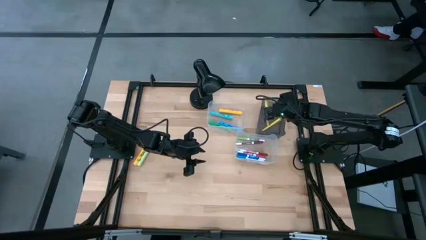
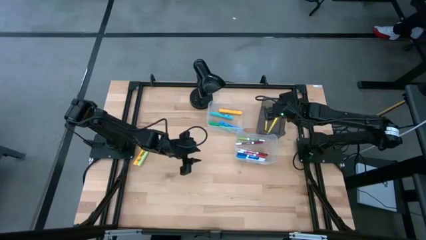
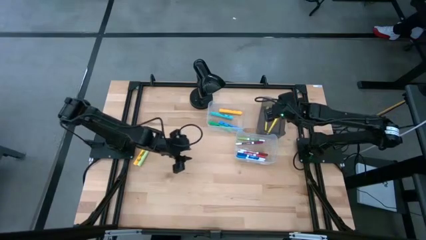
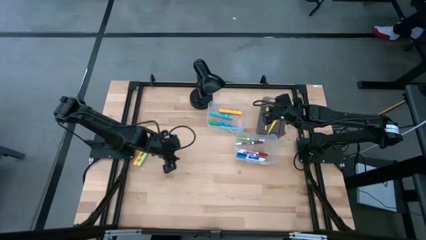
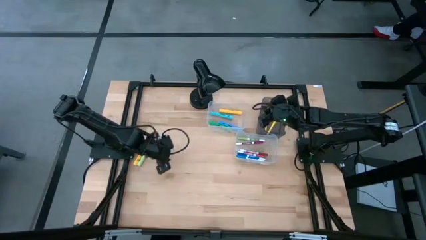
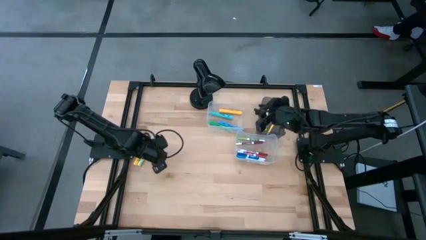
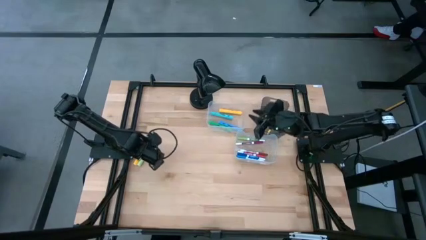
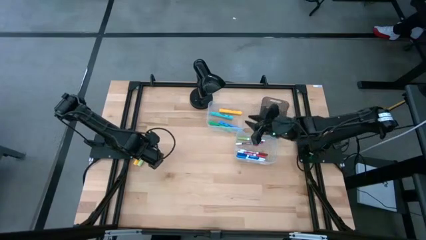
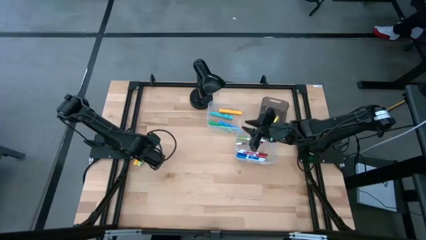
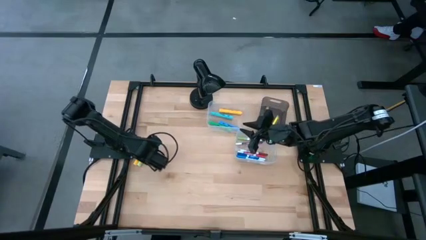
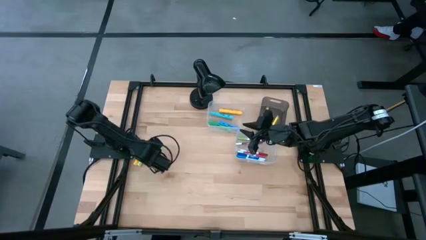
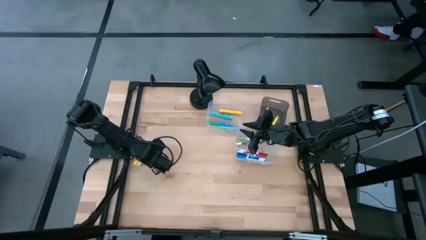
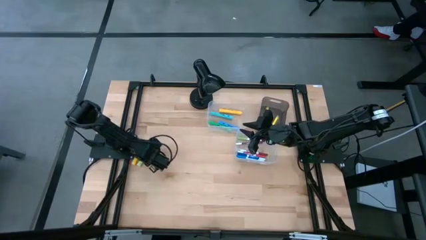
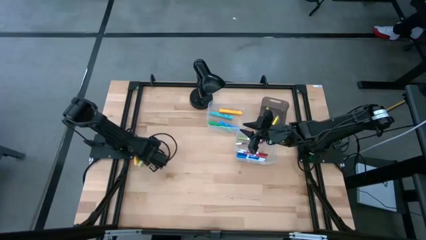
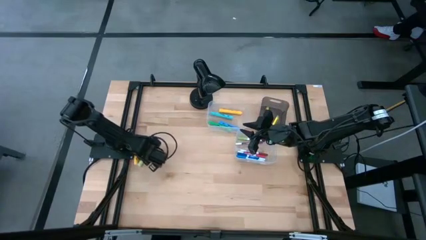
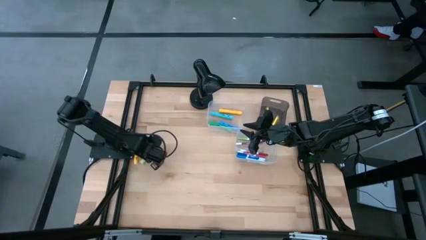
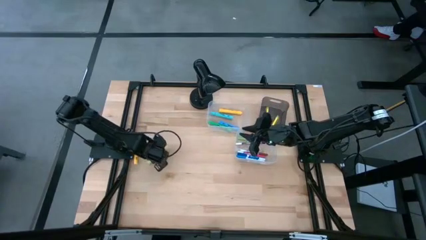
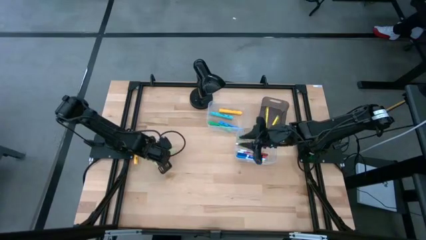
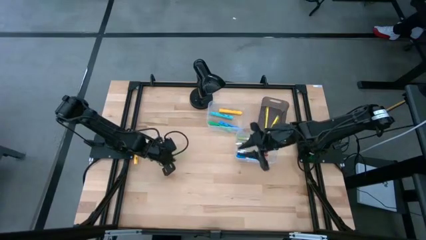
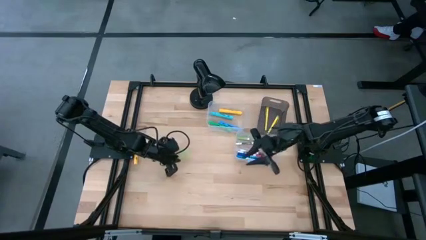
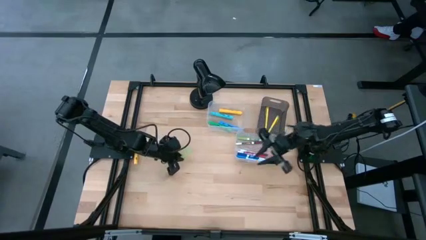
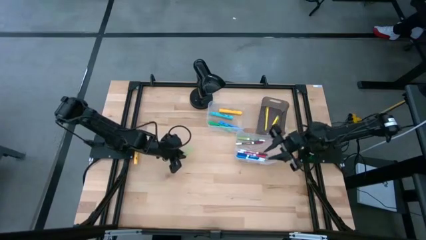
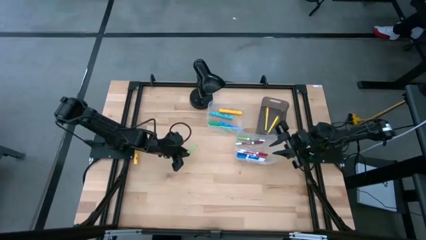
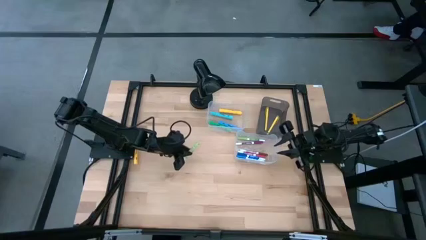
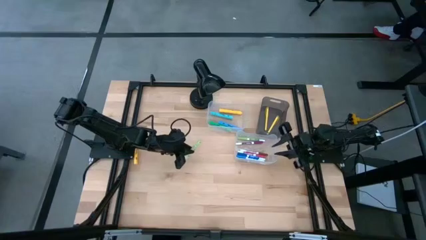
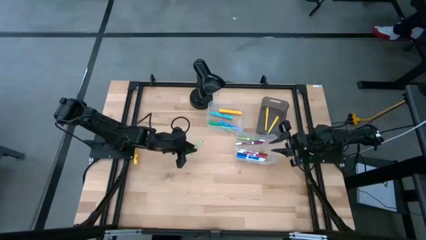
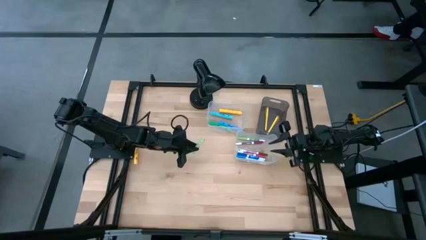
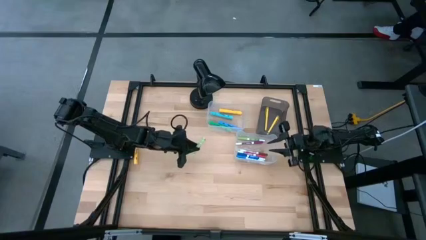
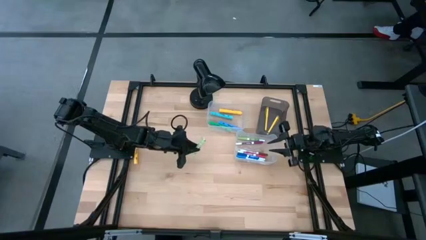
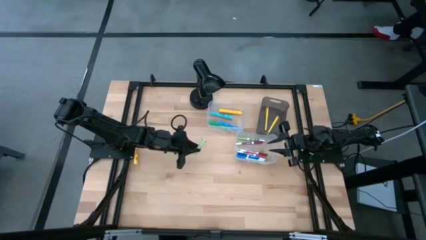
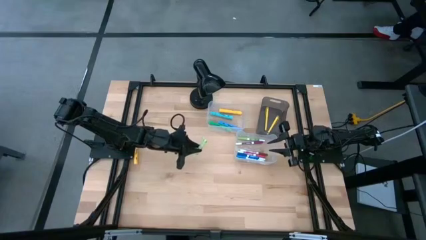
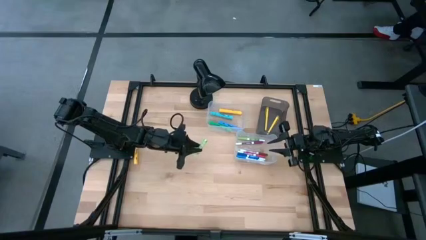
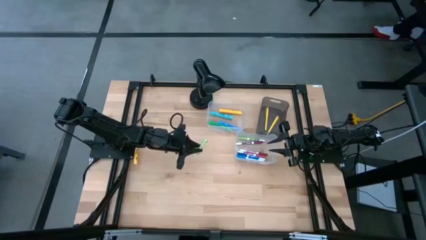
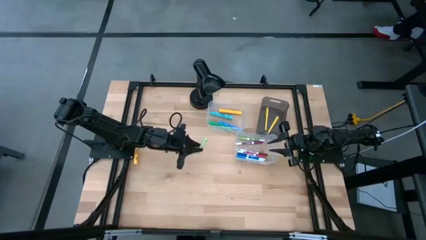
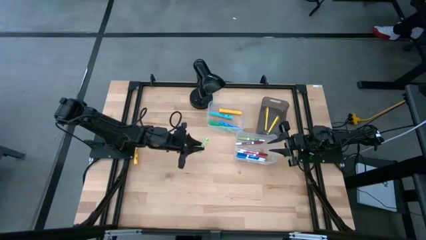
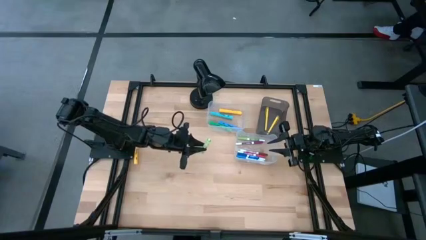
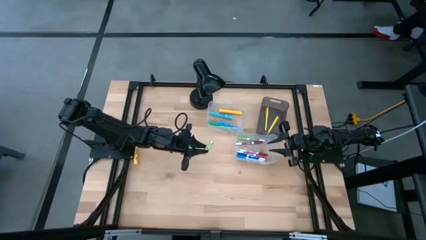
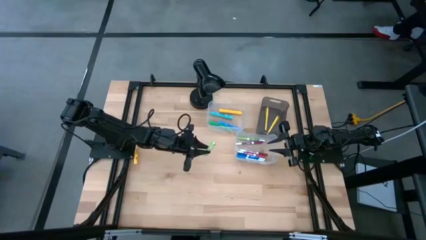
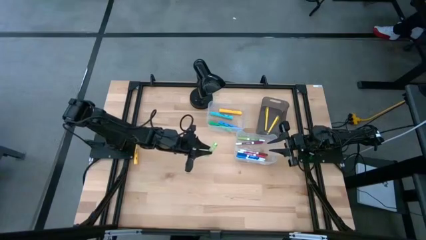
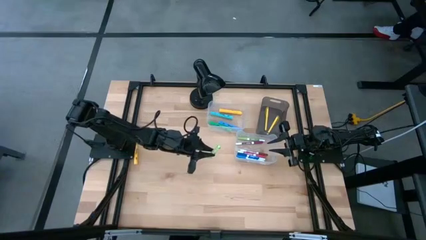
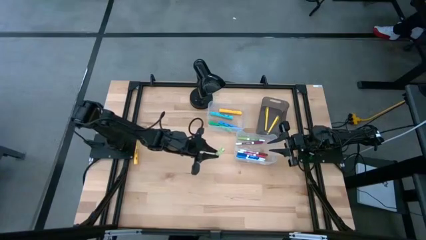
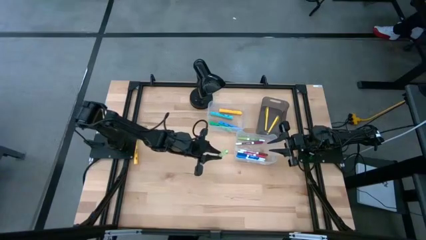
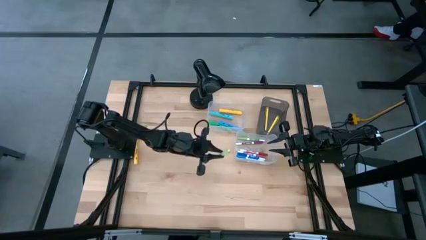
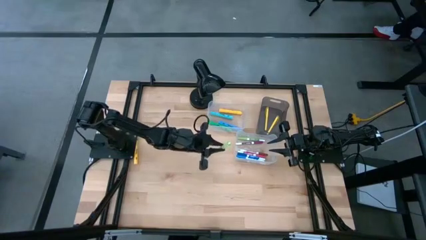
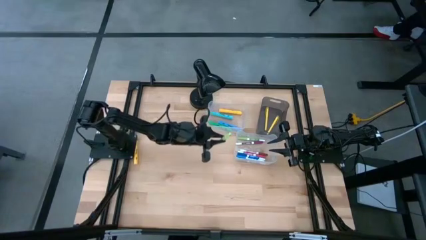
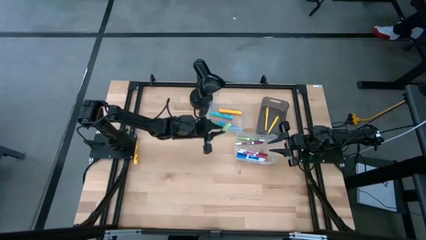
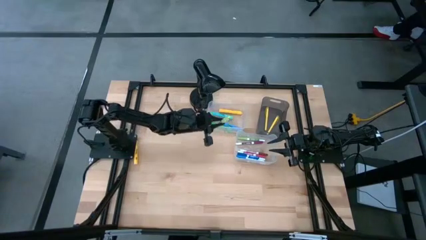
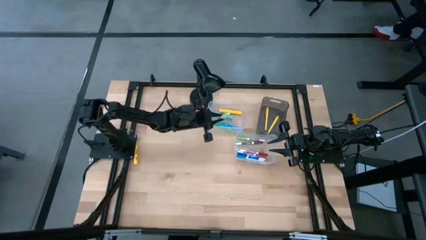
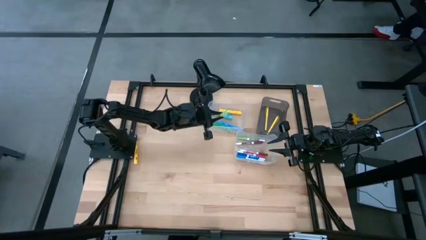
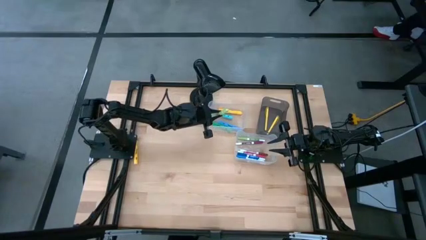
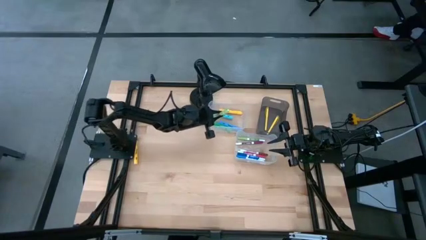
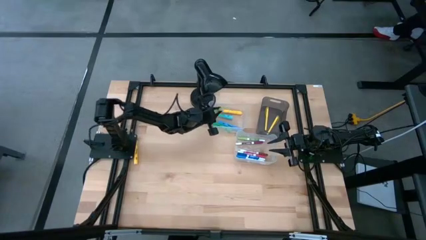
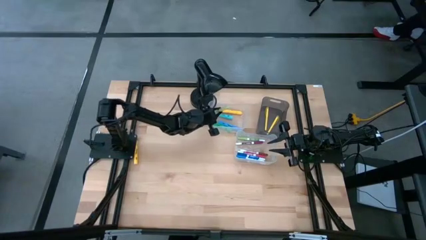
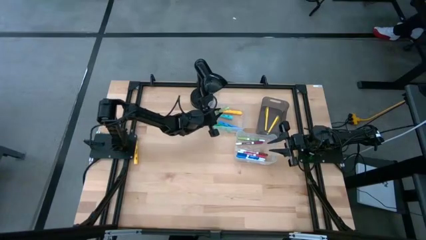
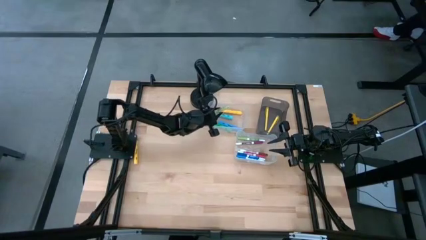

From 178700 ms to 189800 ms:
Task: Pick & Place Markers
Put the light green highlighter pen into the top transparent bin

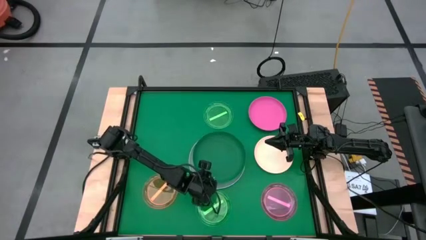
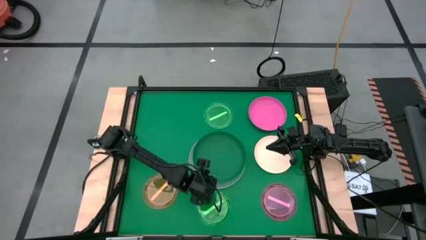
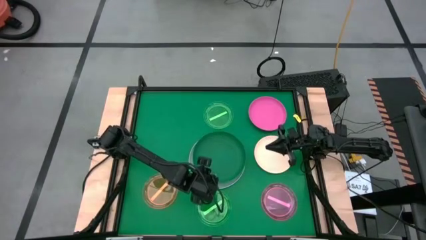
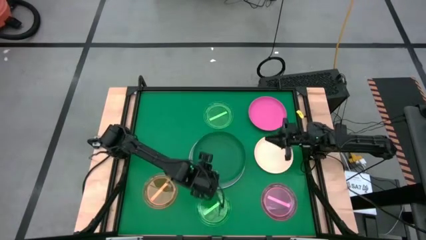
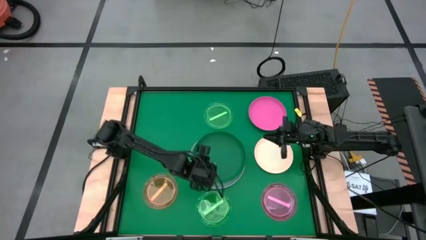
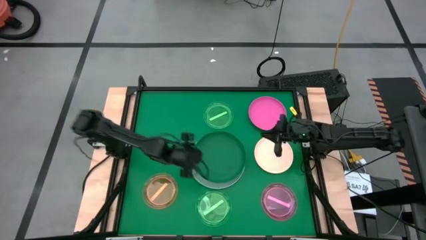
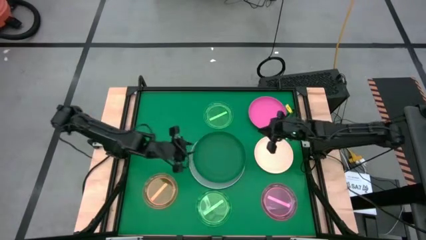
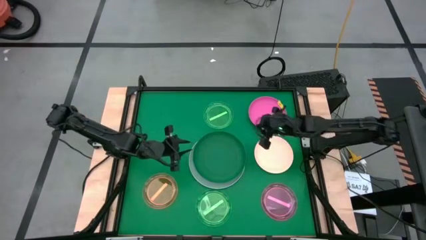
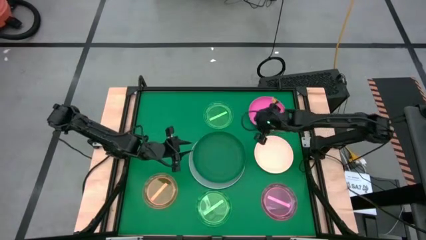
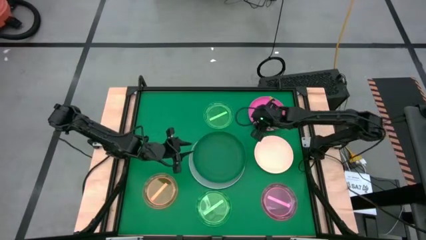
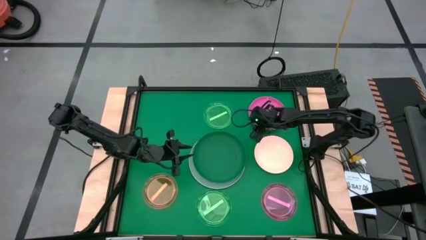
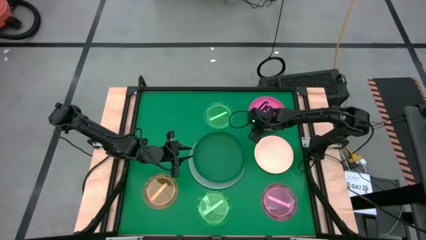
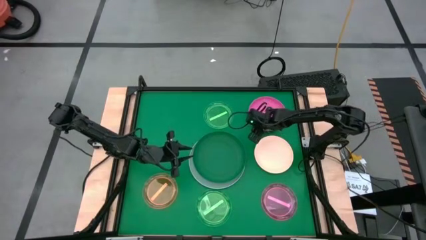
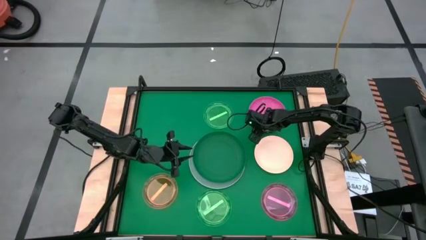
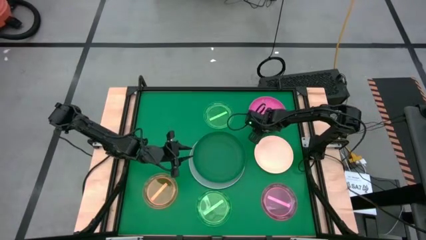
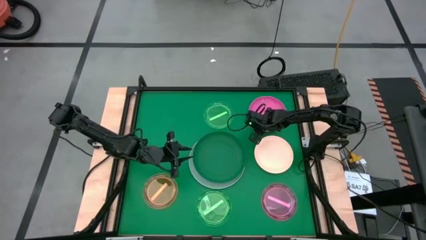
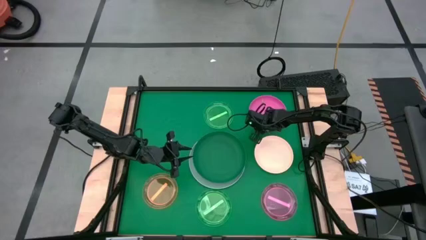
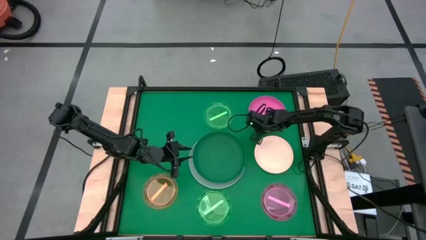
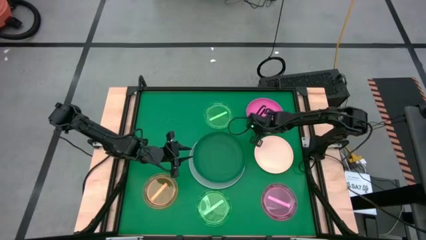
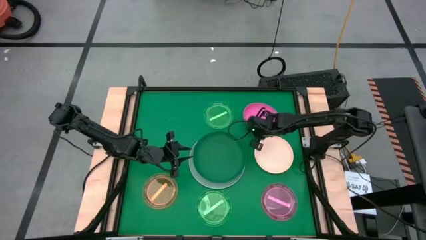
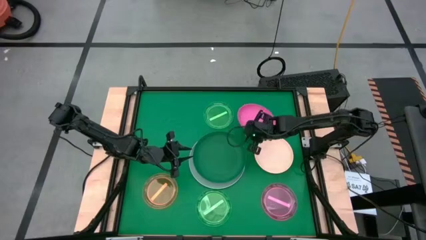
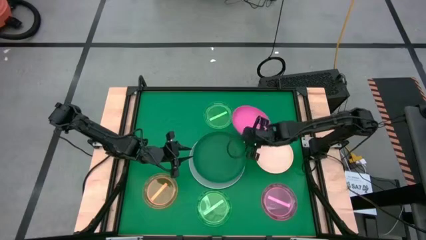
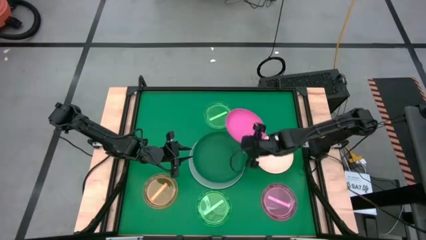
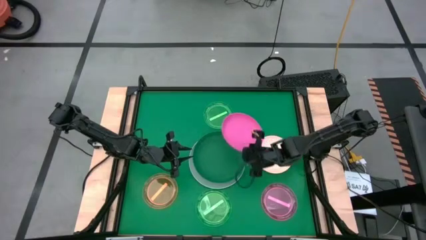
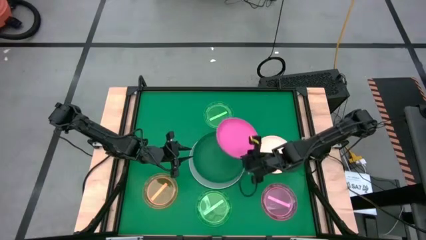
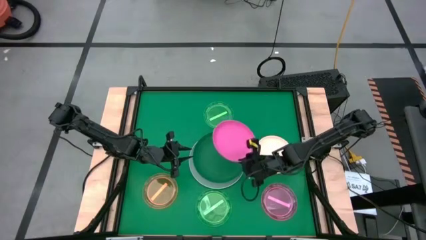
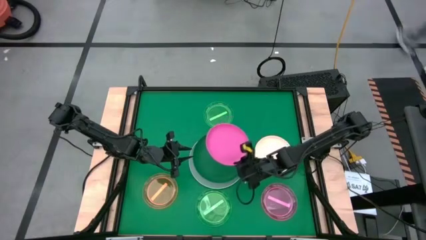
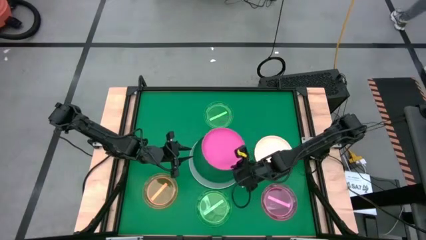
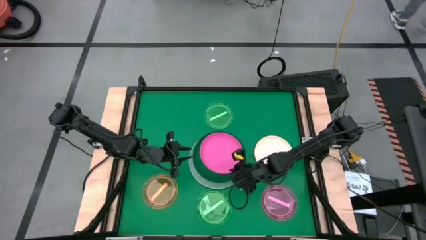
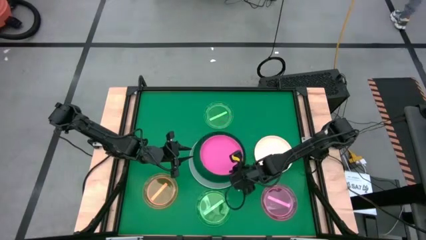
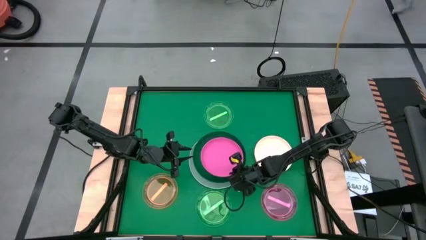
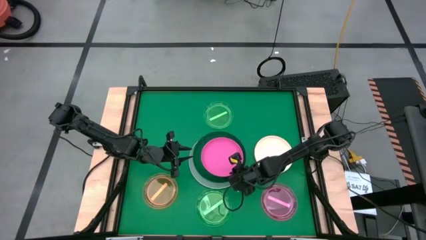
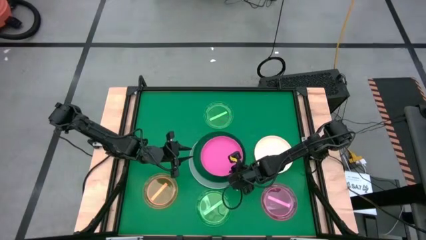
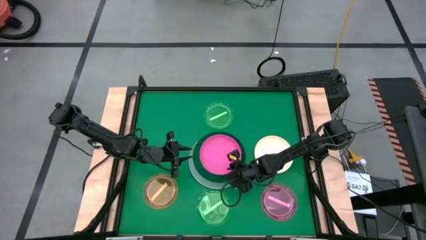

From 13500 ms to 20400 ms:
Task: Stack plastic plates
Stack the large pink plate on top of the large green plate
